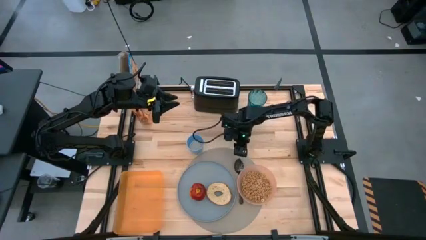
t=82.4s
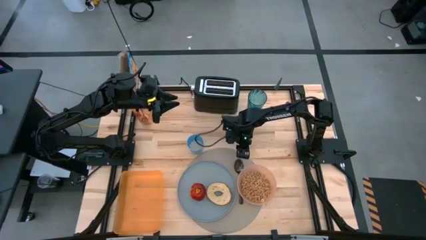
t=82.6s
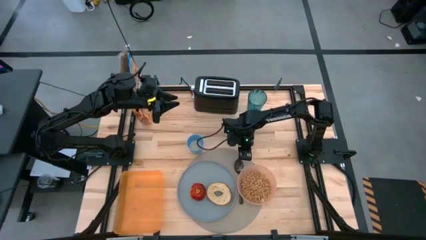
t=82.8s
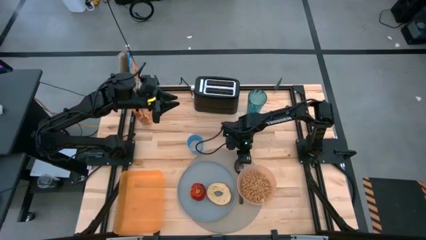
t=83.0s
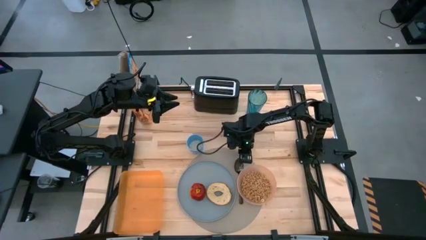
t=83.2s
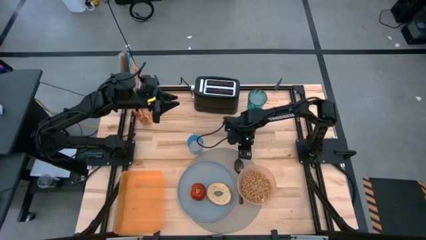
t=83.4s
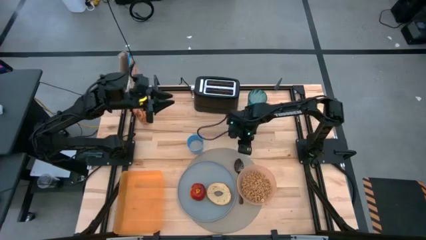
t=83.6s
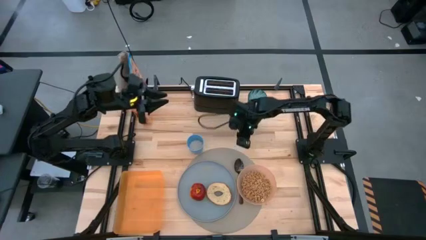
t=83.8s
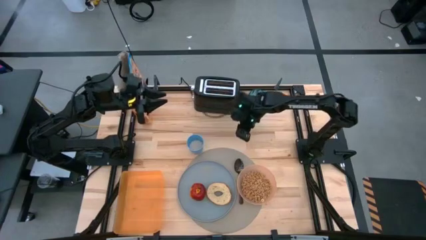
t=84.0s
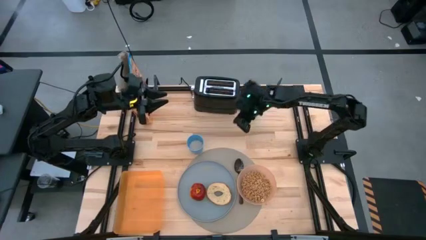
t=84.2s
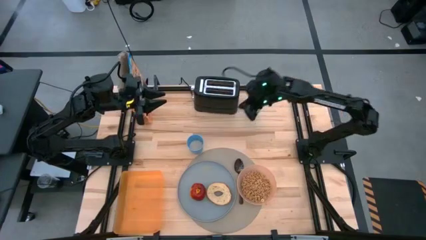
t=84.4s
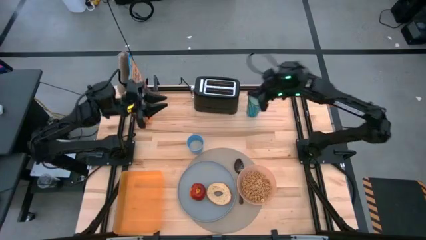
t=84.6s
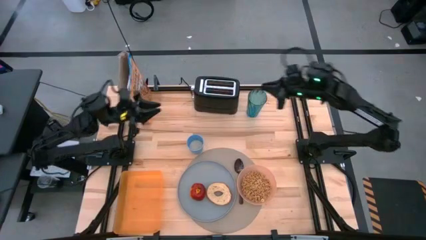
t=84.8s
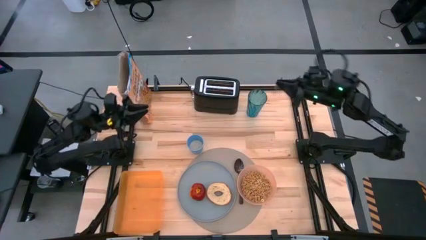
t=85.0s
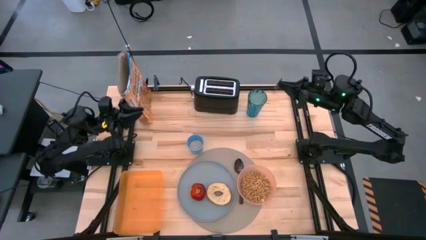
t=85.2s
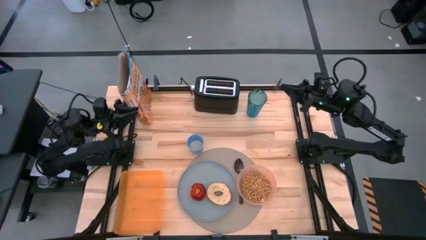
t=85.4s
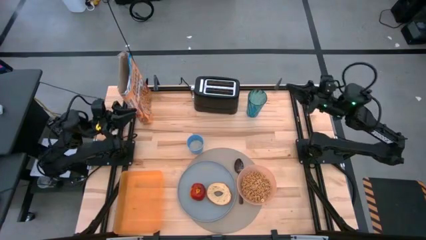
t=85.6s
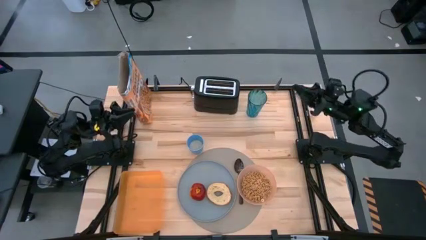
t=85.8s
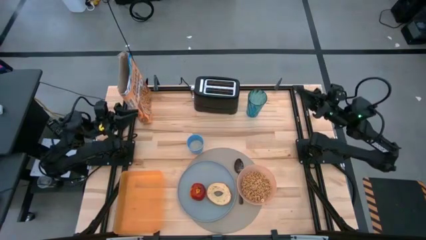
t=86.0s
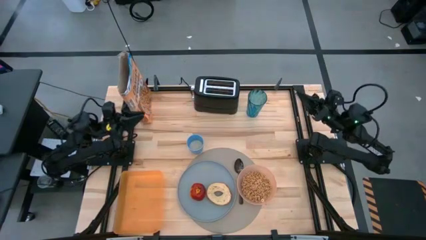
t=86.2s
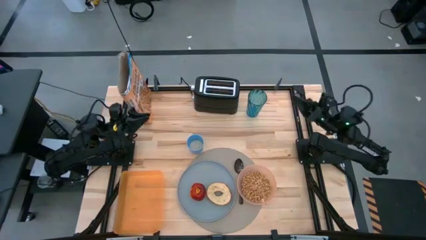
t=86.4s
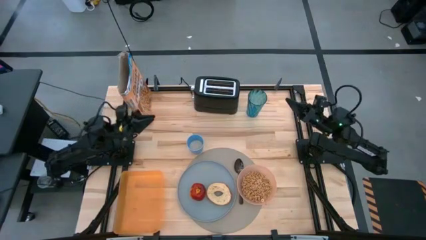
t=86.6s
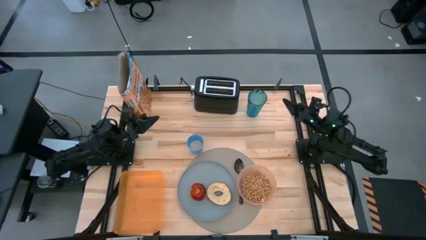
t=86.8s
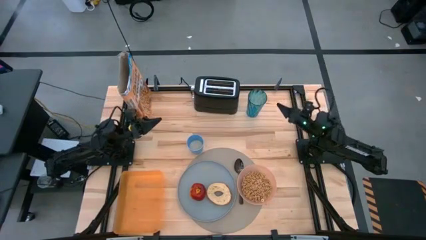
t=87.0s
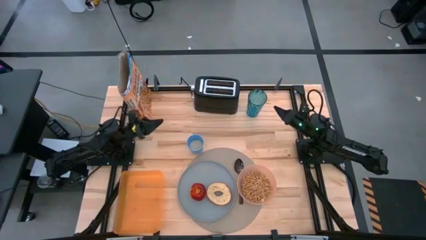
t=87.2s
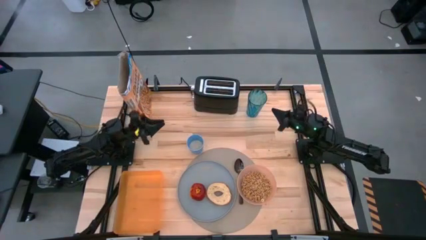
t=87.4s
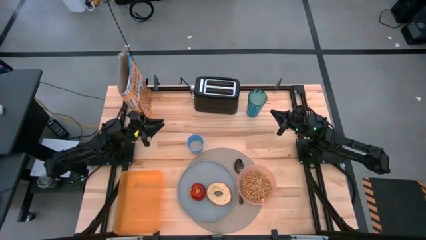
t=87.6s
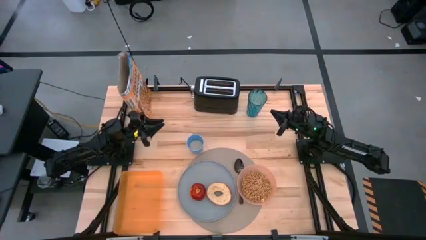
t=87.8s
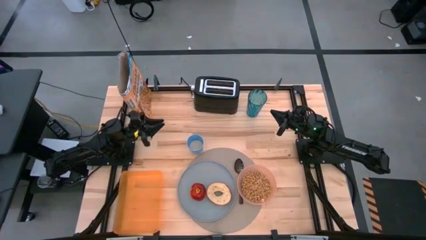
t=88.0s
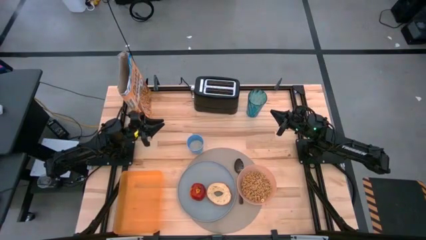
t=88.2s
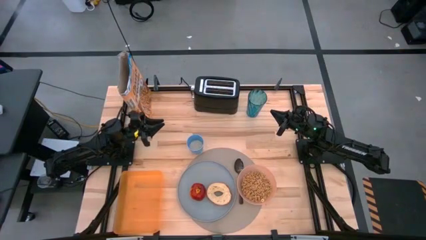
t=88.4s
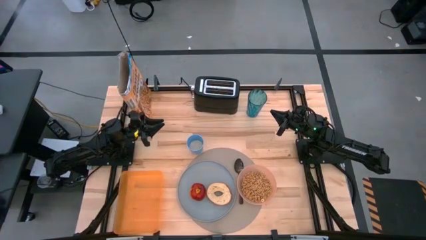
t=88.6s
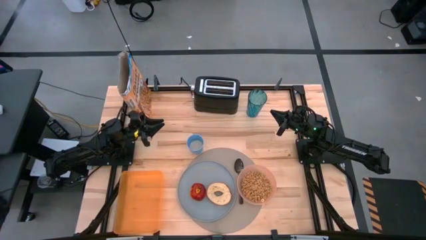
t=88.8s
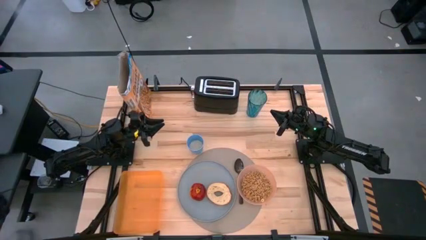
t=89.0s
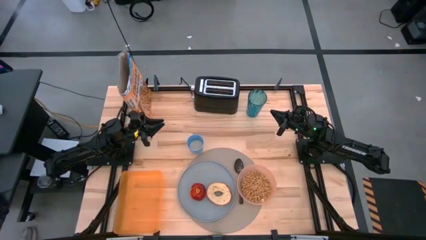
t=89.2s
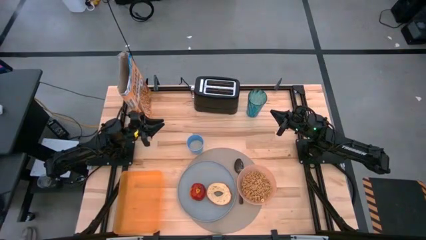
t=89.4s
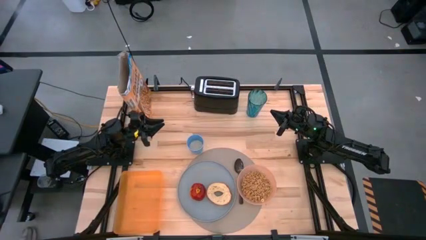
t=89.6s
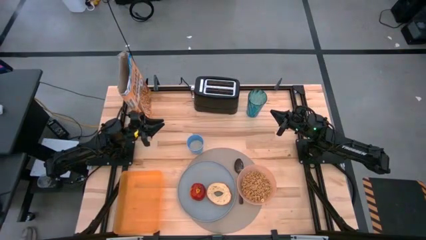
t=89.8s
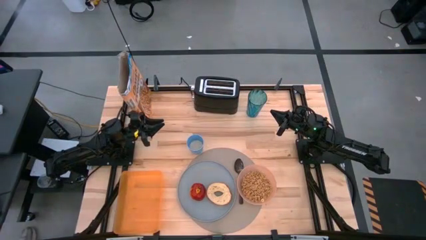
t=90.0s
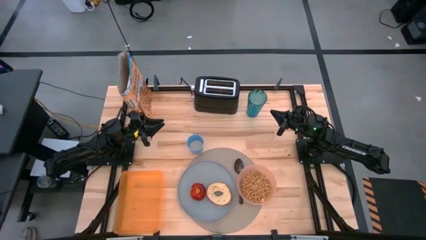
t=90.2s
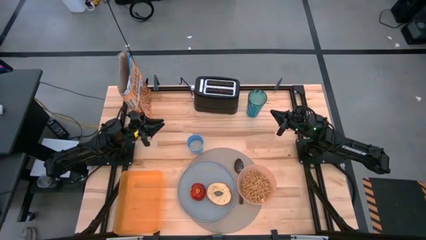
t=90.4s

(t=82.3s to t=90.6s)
Task: Arrange a breakfast setting
Return to Home Position

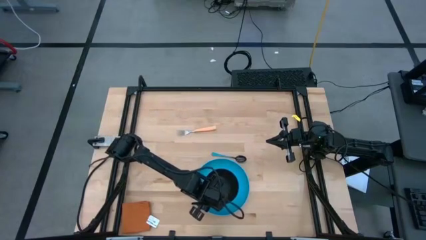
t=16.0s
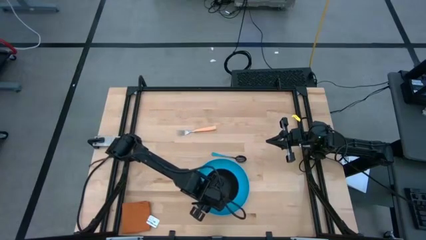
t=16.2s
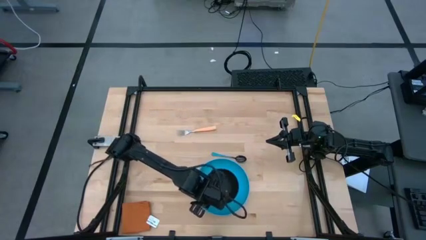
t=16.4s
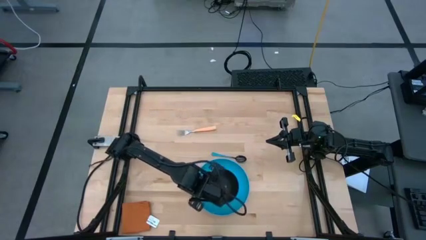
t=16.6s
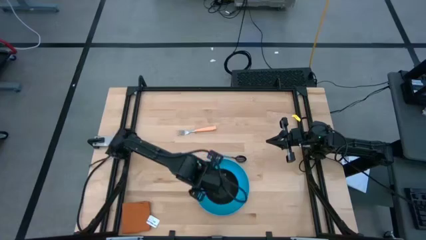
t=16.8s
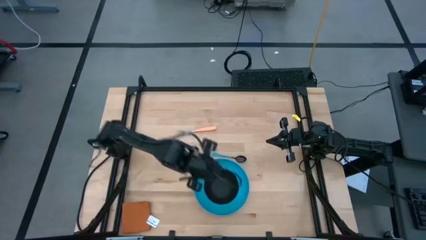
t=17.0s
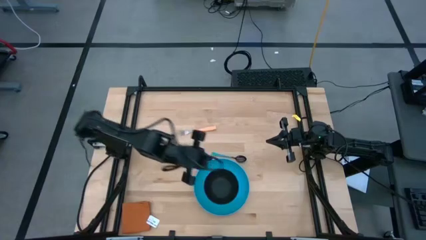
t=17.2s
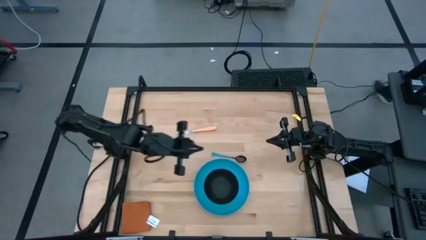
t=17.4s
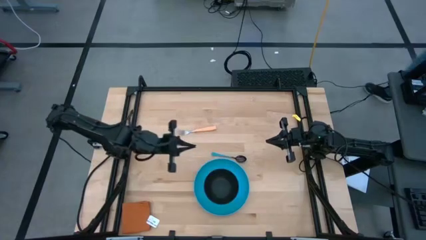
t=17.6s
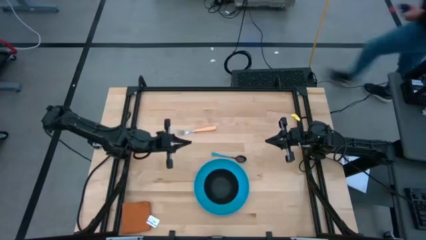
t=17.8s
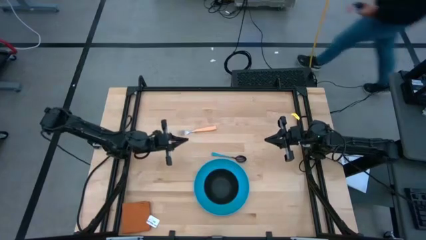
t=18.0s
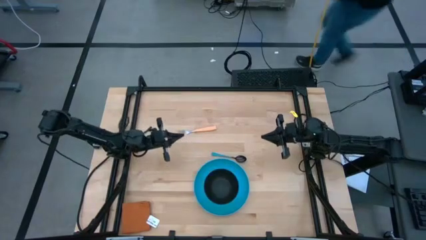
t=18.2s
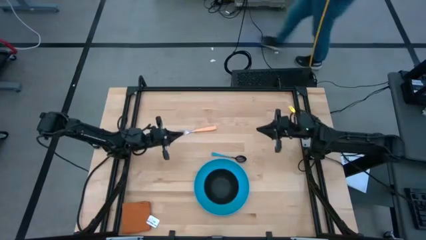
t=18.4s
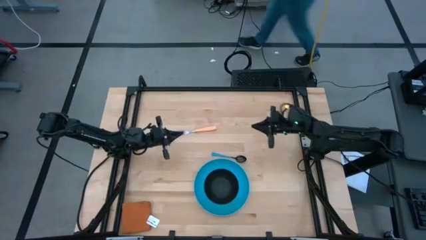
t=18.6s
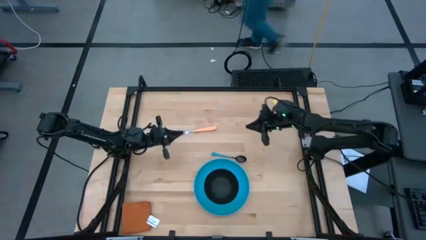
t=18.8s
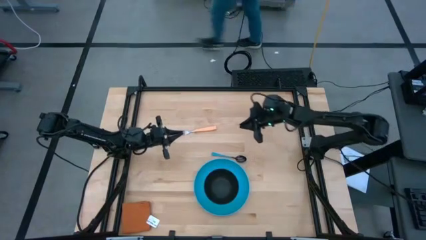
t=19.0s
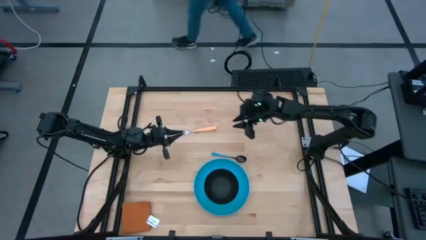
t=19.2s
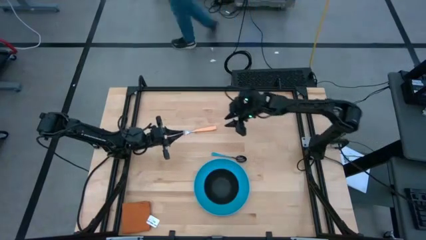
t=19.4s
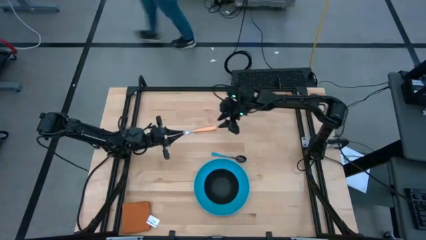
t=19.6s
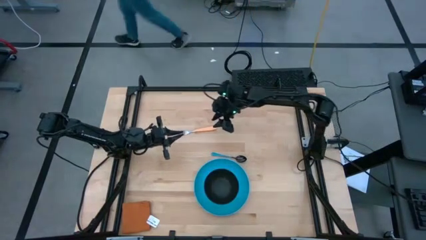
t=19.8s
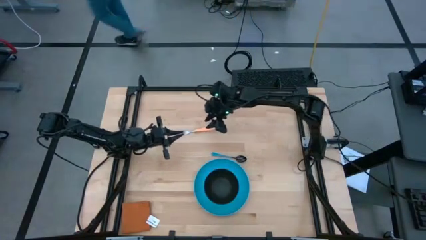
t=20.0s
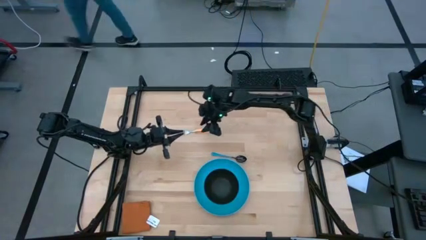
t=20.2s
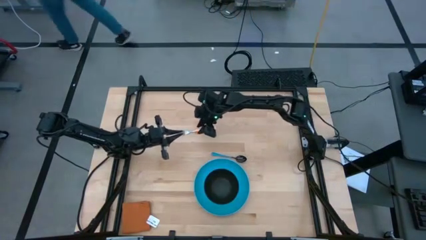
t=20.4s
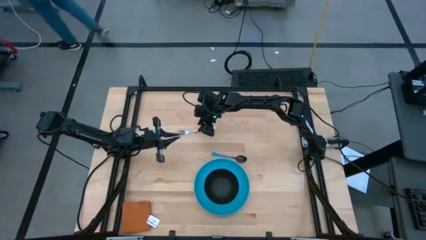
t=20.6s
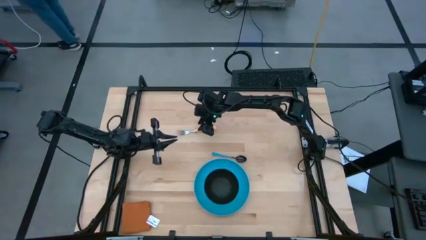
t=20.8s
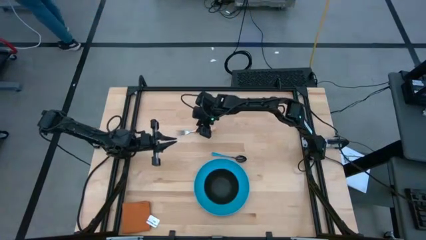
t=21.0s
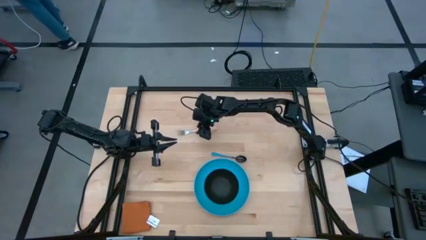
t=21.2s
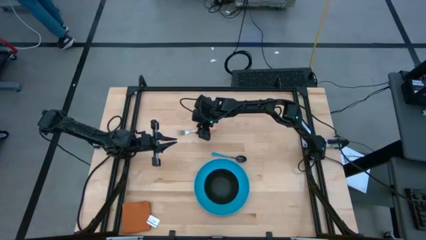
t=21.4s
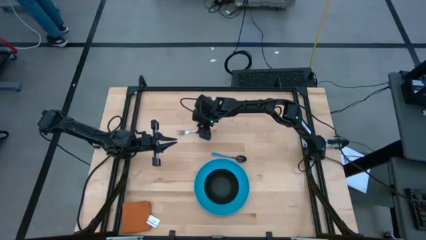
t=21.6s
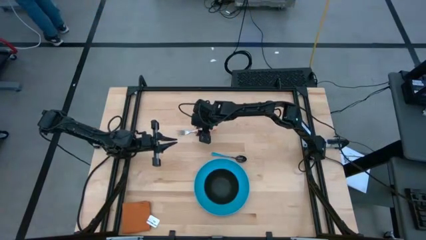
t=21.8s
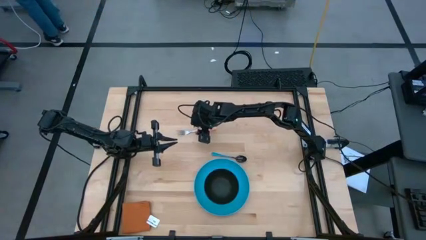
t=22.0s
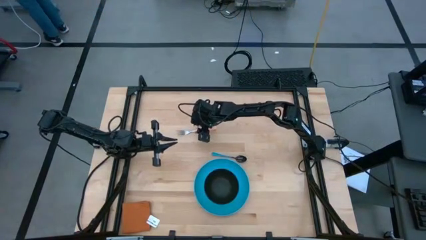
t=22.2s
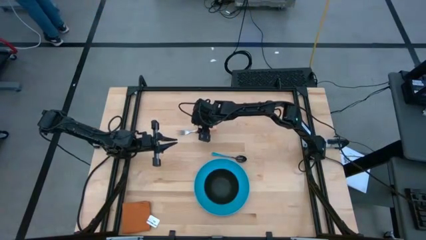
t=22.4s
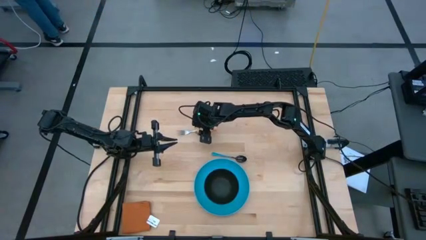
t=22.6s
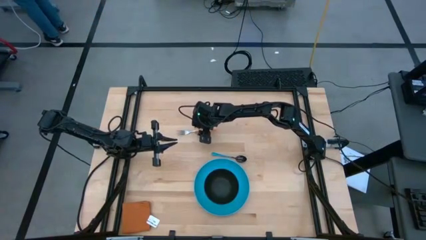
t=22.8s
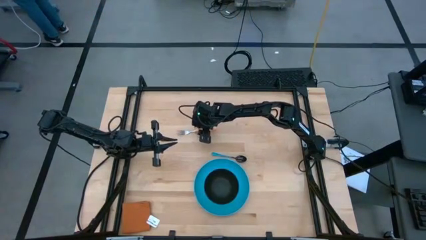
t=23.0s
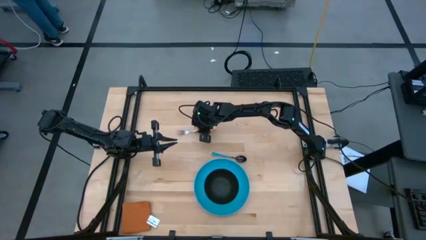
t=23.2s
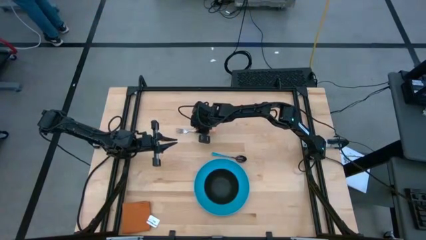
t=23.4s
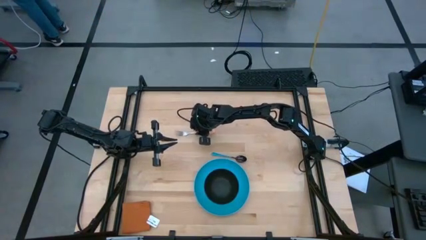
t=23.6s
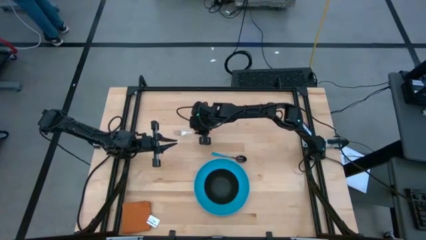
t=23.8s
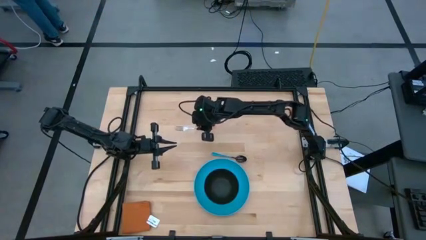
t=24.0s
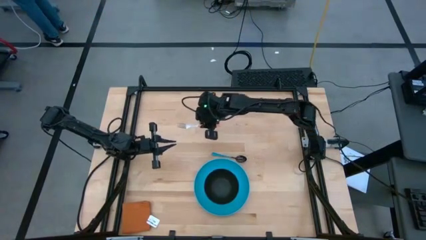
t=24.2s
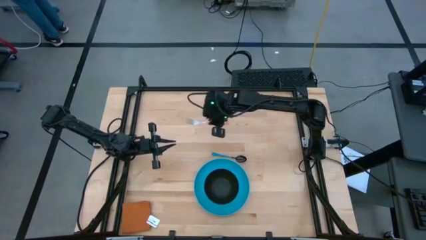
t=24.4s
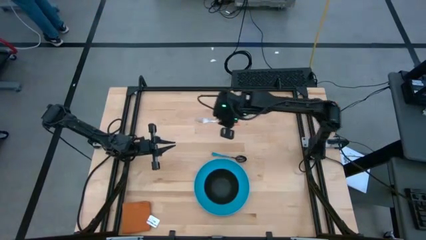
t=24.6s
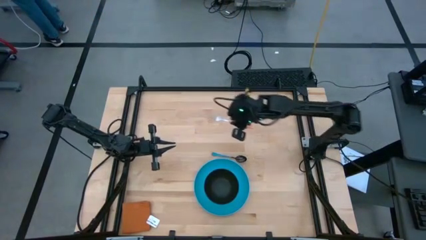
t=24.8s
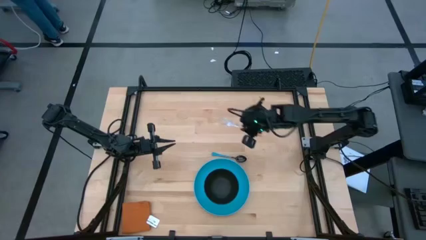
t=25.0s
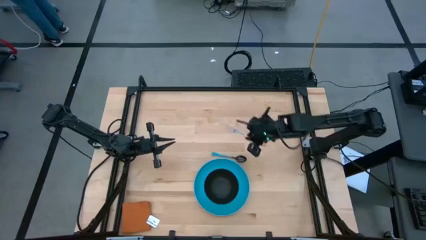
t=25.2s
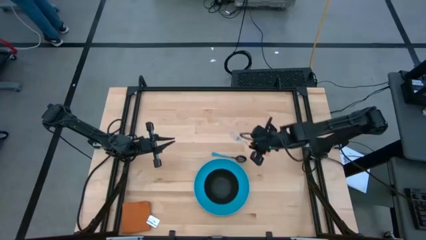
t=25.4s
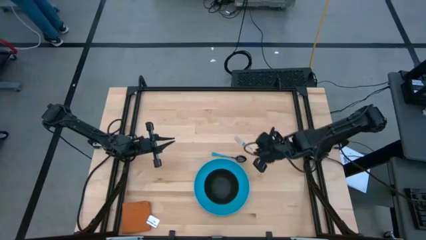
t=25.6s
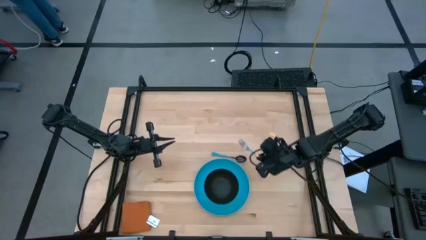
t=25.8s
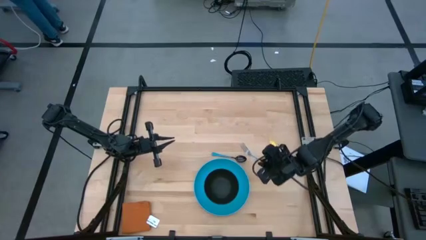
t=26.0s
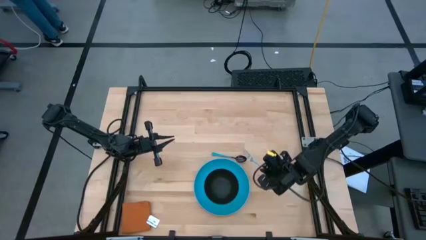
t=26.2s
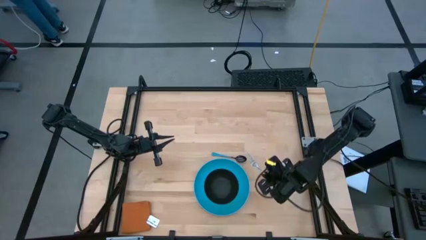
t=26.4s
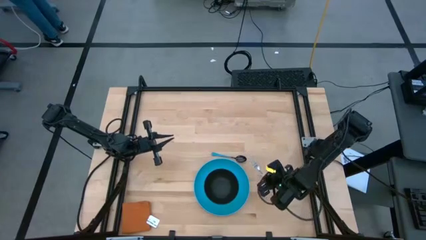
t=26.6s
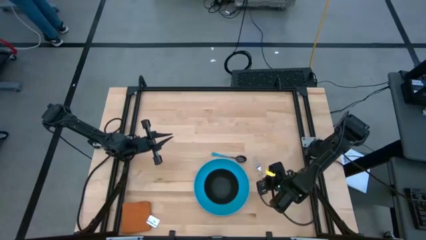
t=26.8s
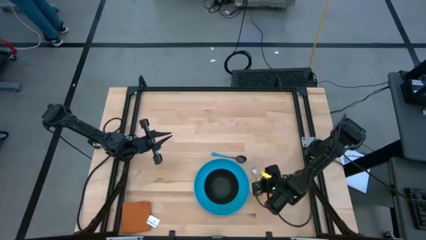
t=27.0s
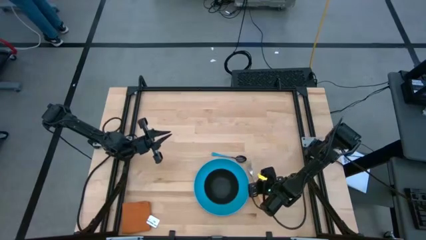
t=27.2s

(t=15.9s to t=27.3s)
Task: Set table place
Put the pink fork on the right side of the plate on the table
